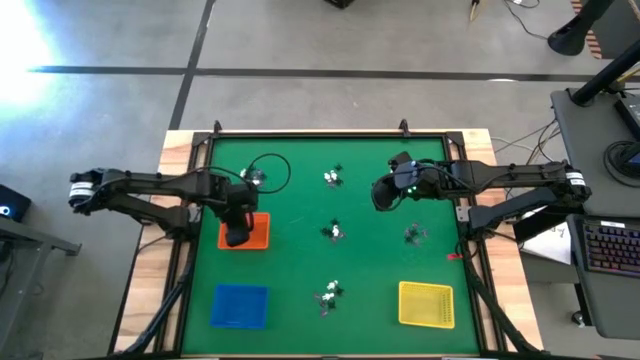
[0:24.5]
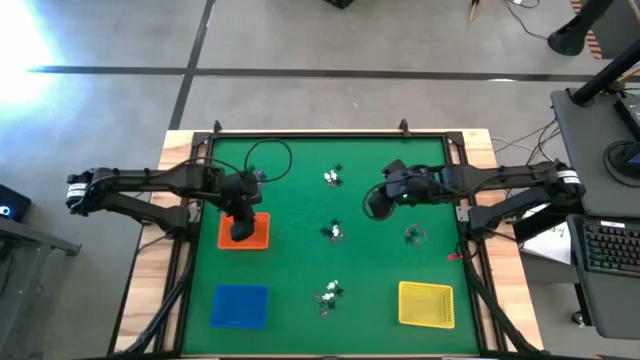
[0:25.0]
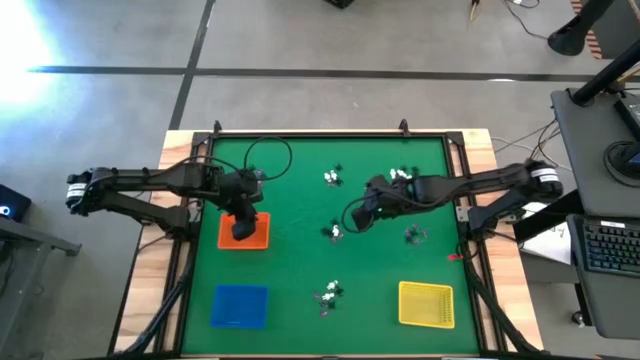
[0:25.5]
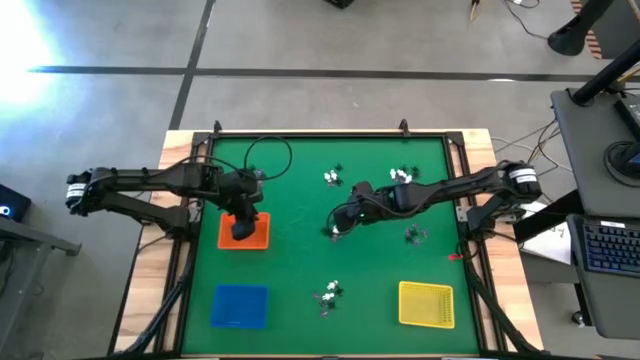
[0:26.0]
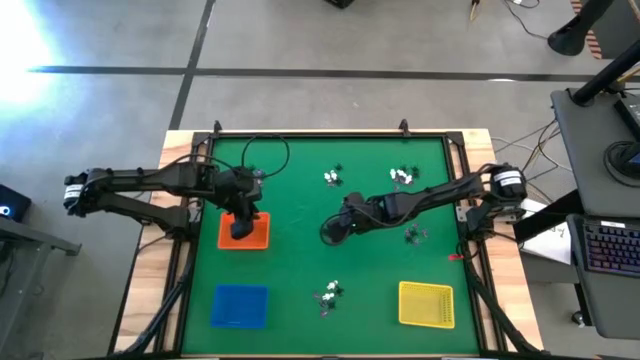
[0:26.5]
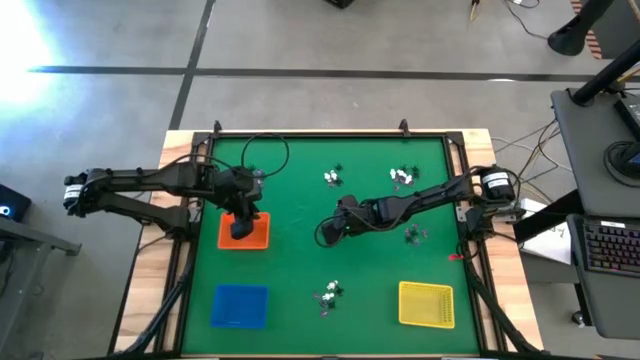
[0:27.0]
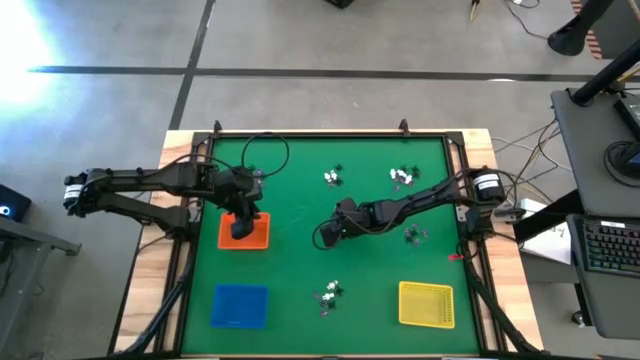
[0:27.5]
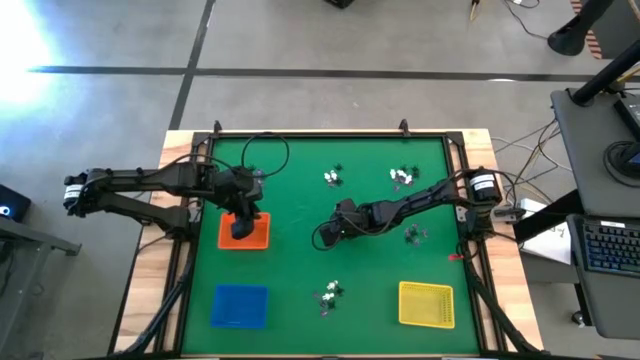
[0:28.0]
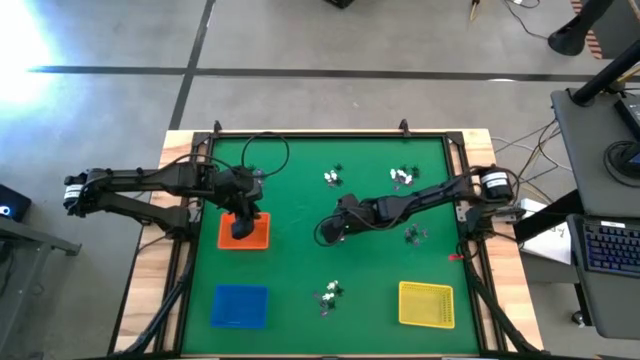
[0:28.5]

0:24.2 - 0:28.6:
Task: Sort Halloween decoration
Put the white skeleton toy into the yellow bin

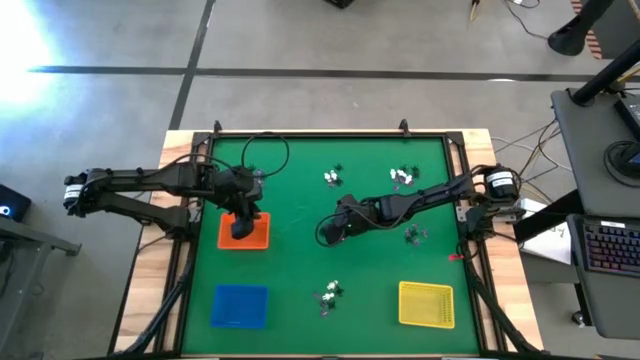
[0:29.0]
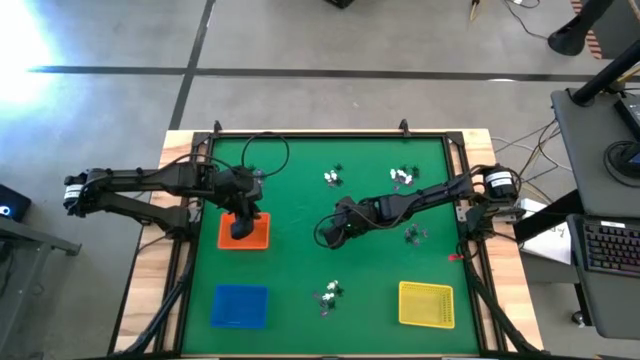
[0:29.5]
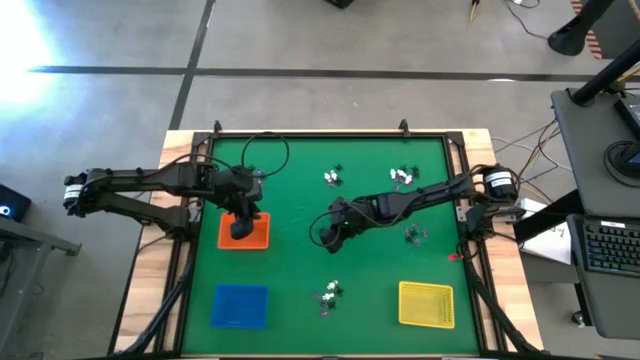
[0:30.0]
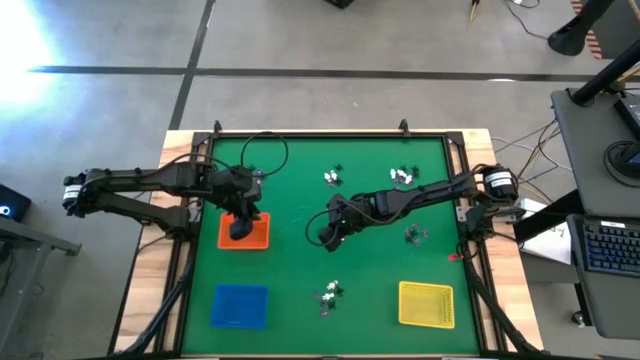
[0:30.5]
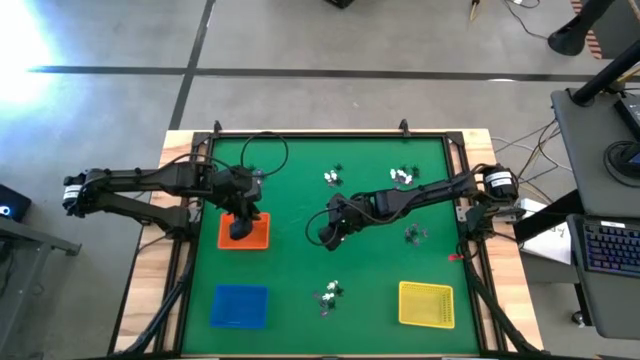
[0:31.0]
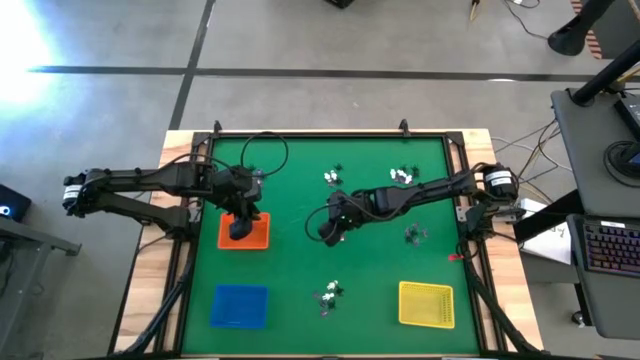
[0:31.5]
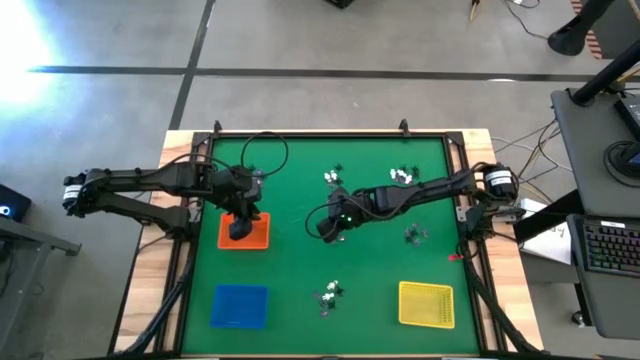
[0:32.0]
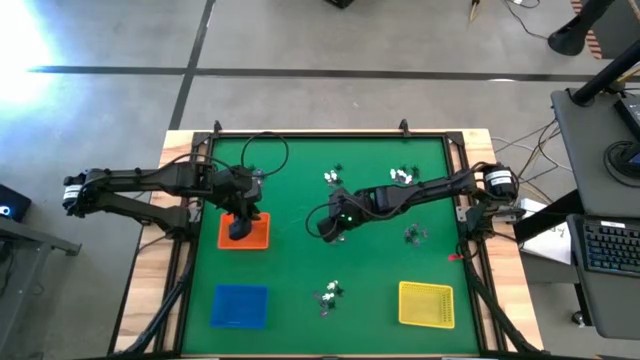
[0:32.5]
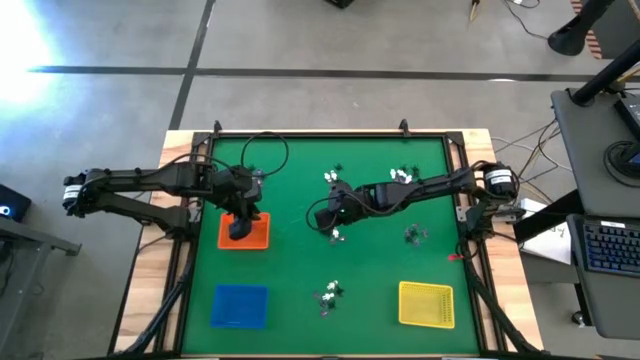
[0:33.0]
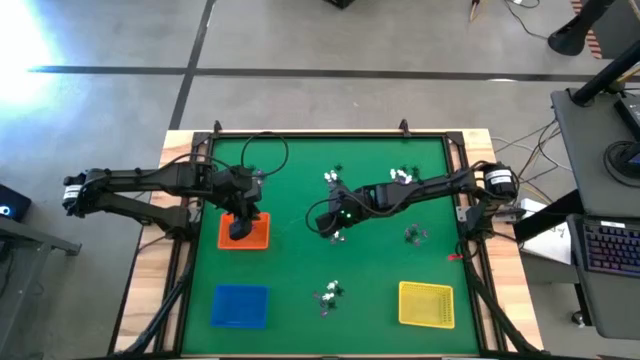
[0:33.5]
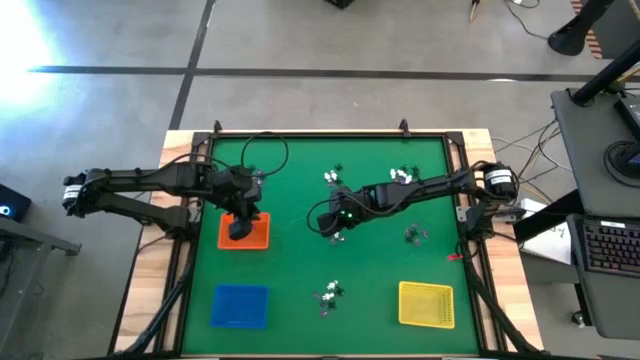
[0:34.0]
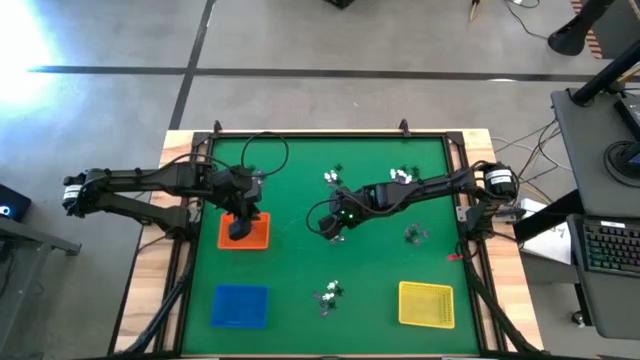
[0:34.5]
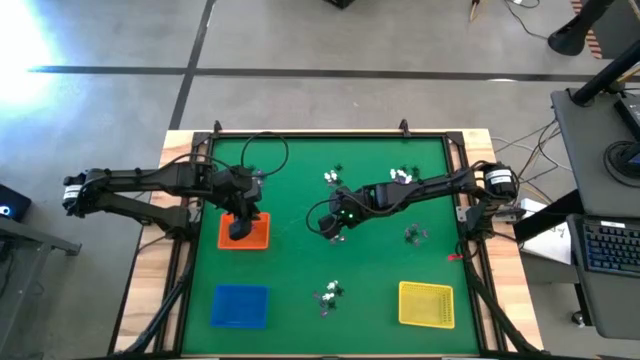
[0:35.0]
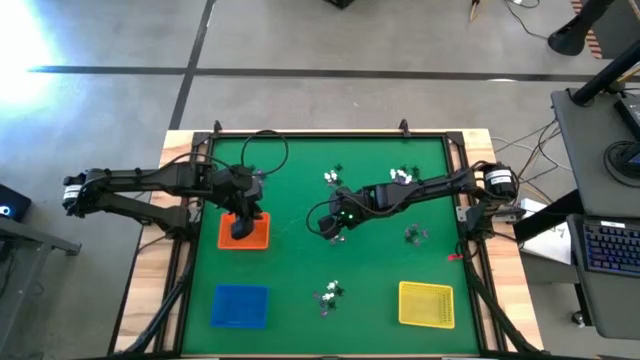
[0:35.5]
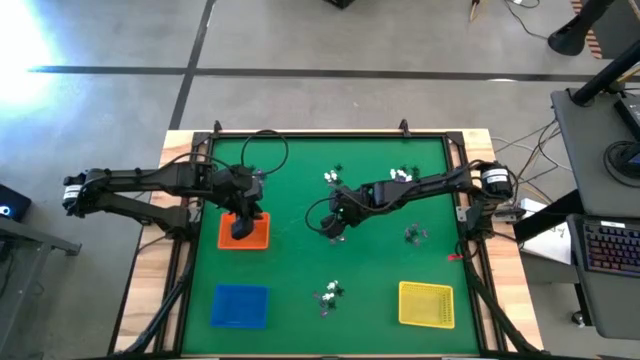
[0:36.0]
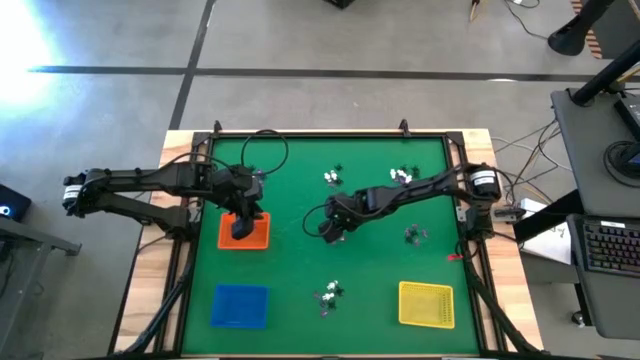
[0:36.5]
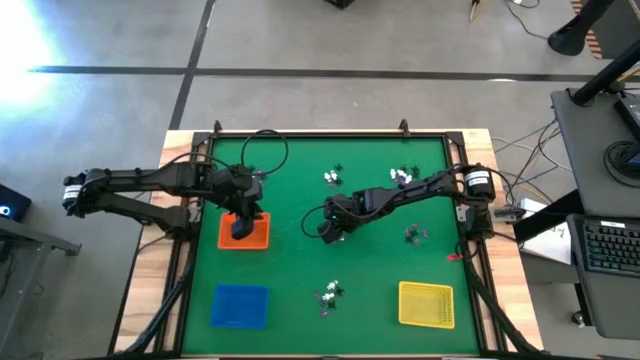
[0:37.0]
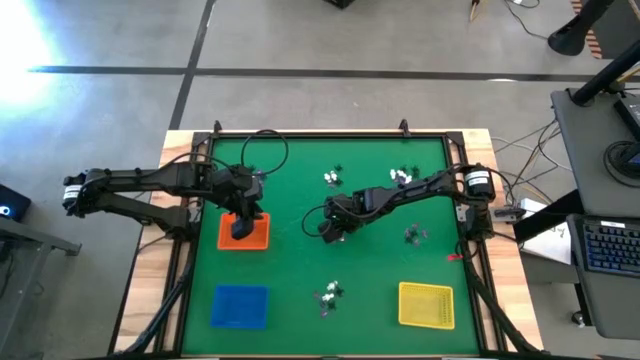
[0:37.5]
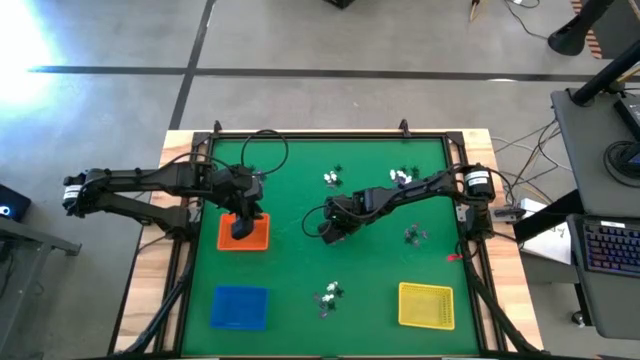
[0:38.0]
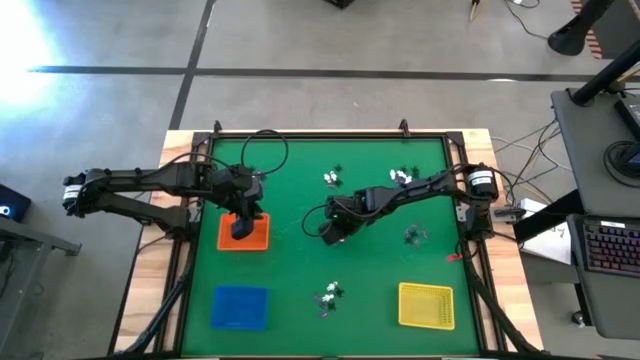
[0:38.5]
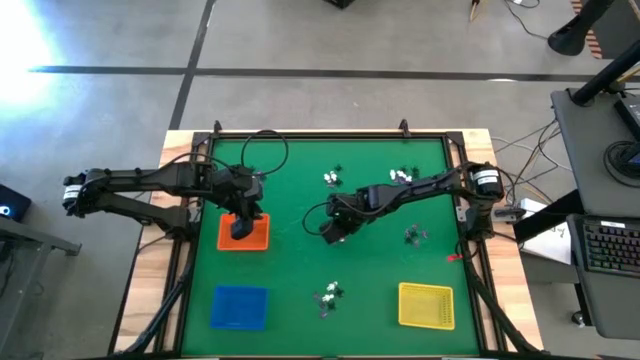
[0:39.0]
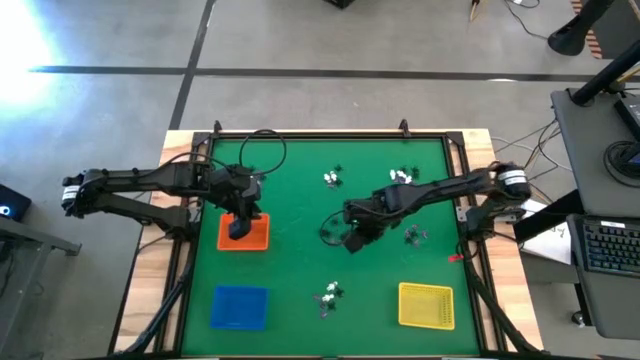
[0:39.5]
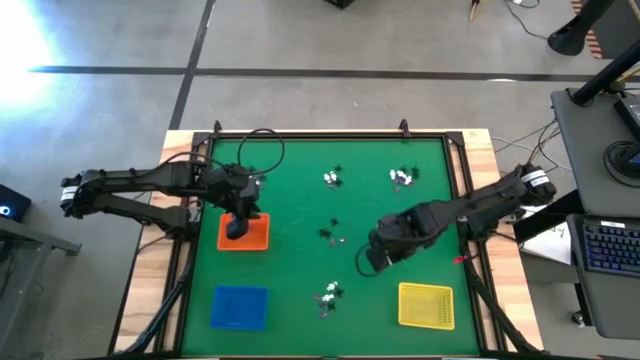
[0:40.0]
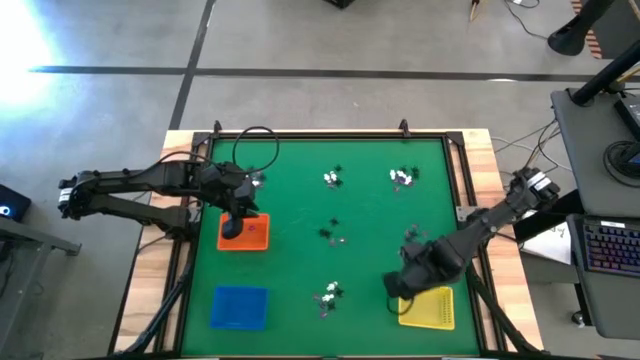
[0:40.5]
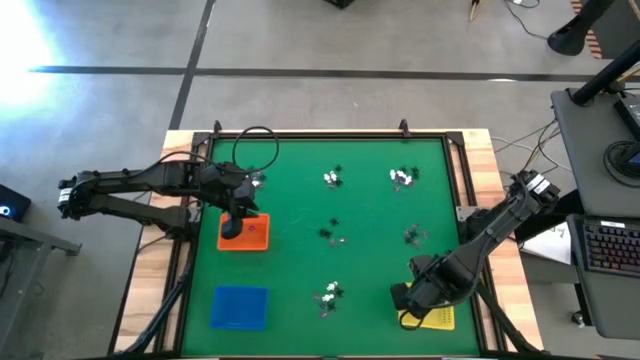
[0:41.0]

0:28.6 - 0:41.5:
Put the white skeleton toy into the yellow bin

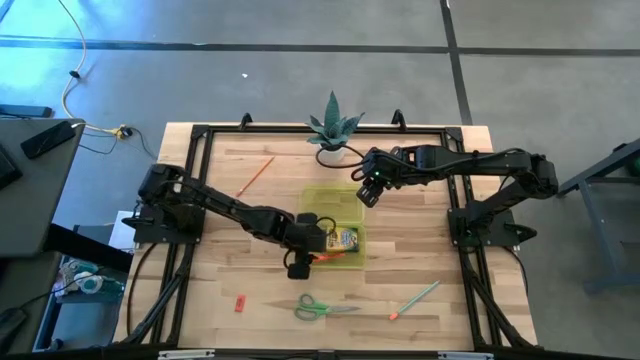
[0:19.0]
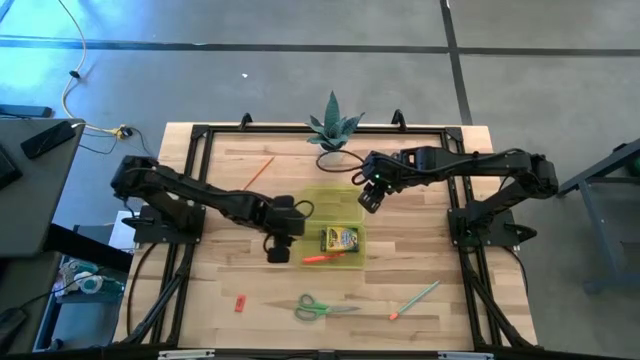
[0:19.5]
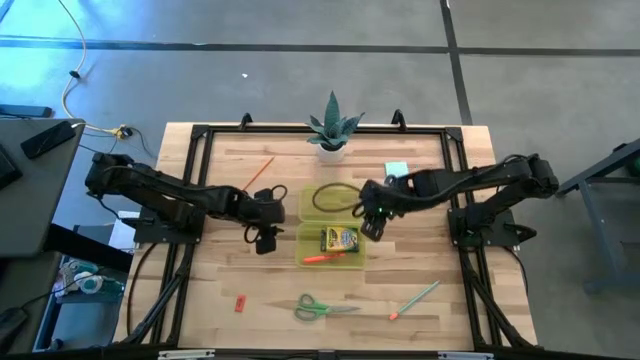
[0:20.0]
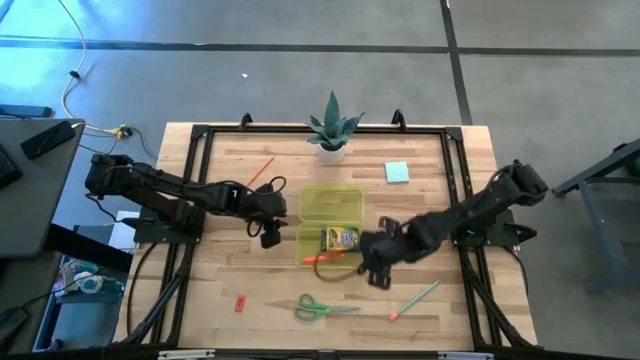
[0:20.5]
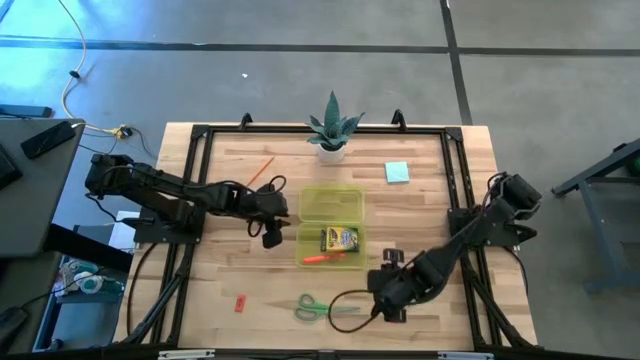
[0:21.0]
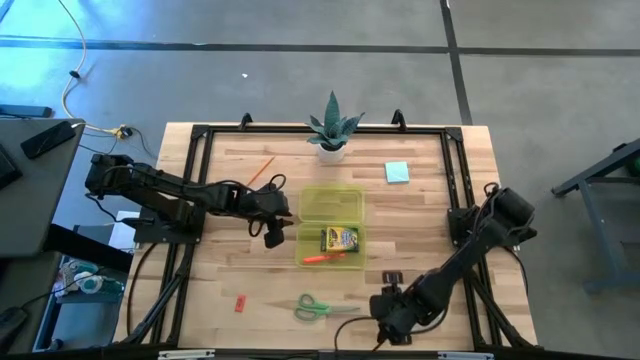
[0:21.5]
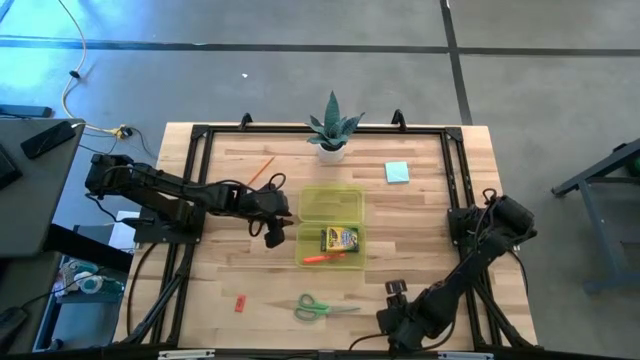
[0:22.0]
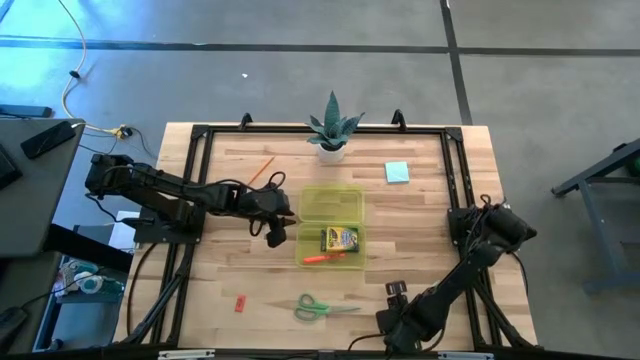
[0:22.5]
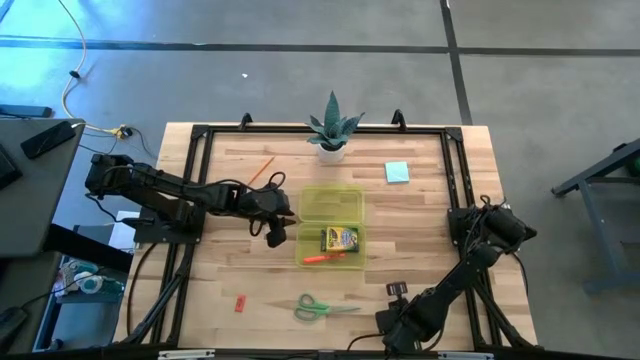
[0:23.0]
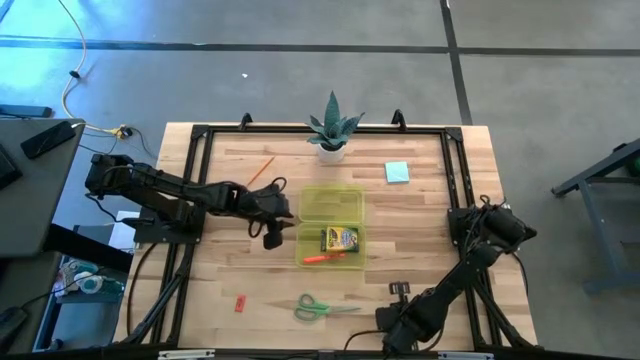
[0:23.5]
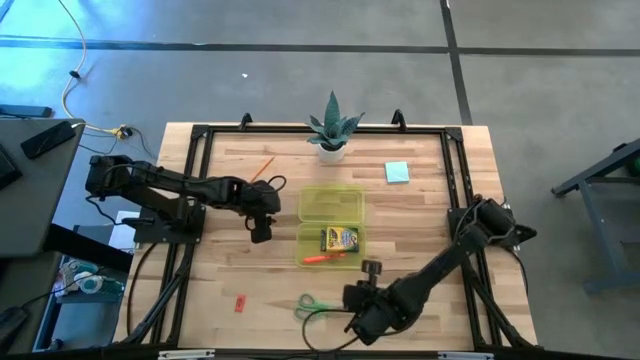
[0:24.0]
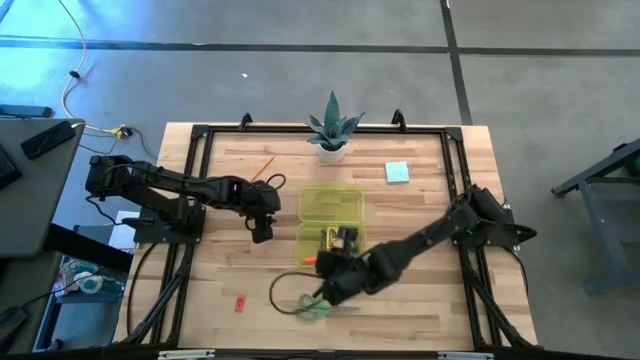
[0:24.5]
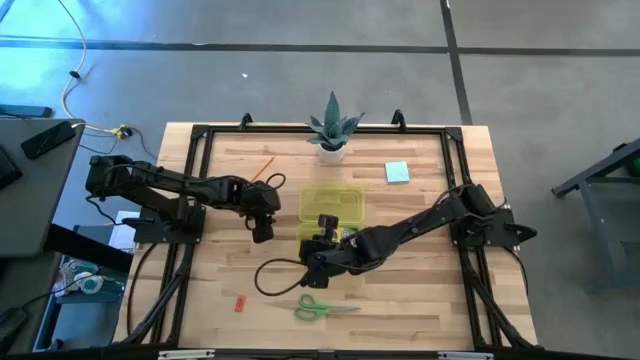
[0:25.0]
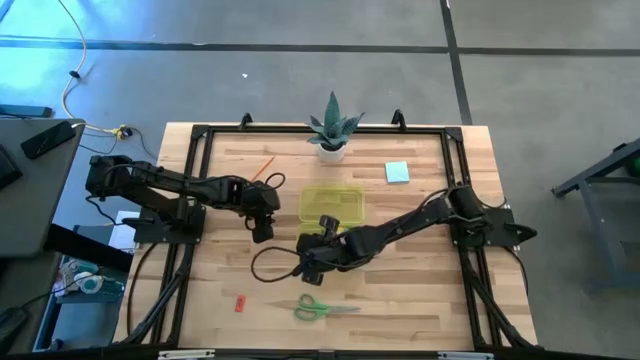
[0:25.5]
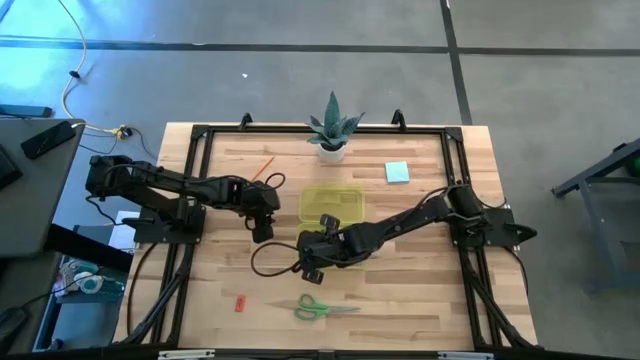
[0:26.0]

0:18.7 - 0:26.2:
Task: Pack school essentials
Put the light blue pencil into the yellow school supply box
